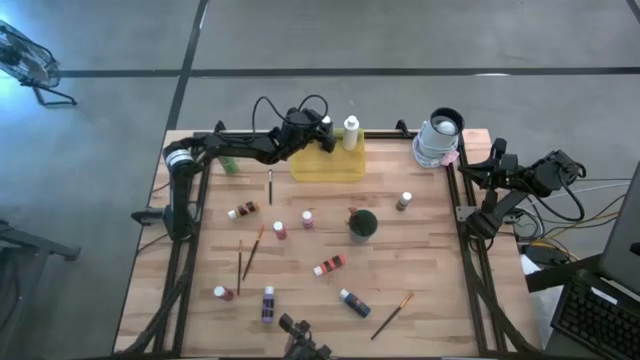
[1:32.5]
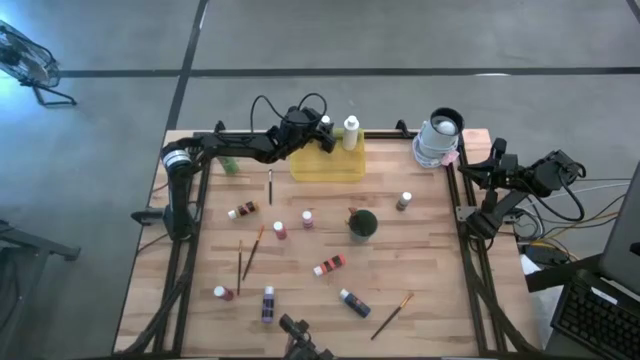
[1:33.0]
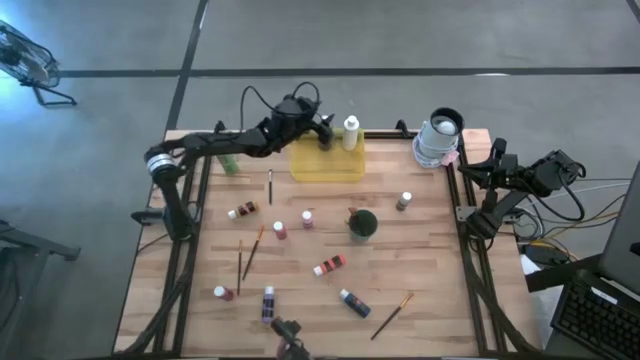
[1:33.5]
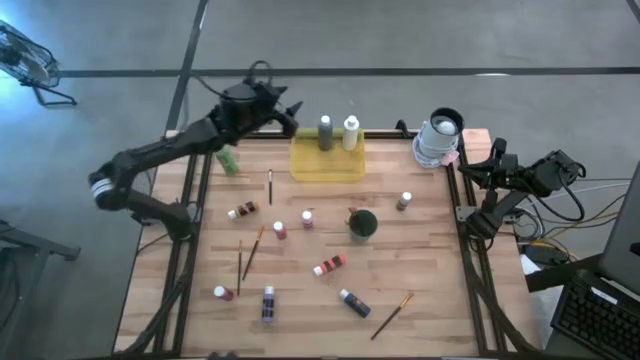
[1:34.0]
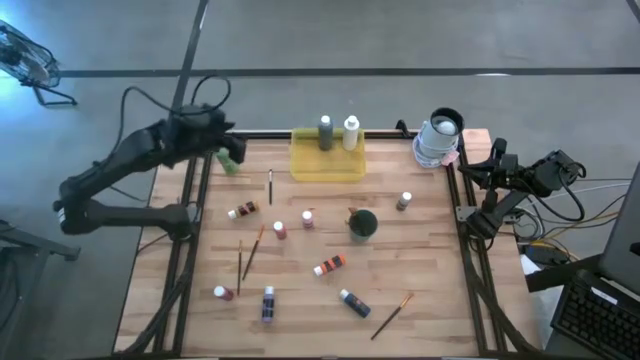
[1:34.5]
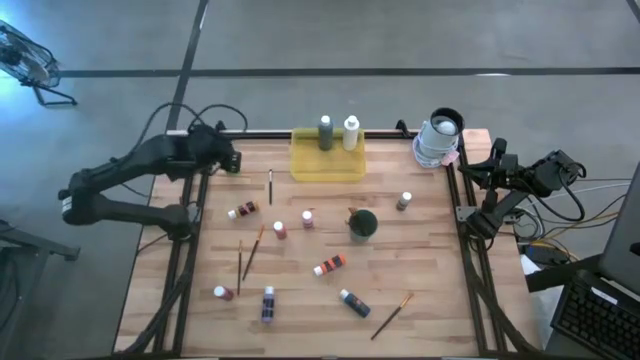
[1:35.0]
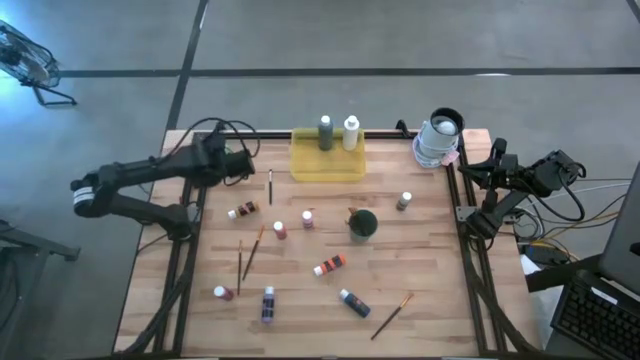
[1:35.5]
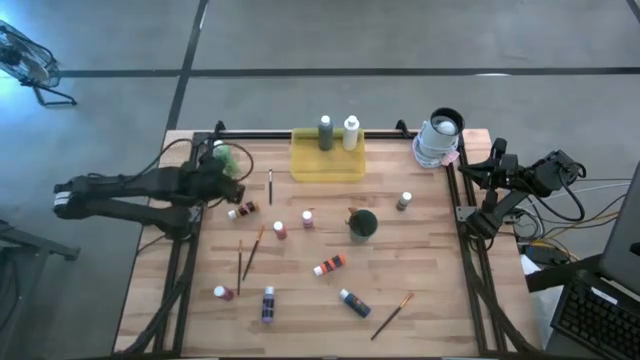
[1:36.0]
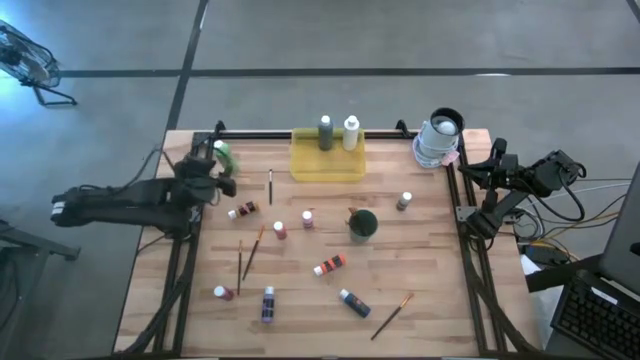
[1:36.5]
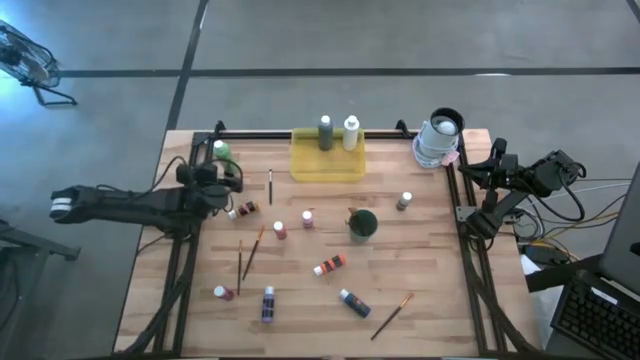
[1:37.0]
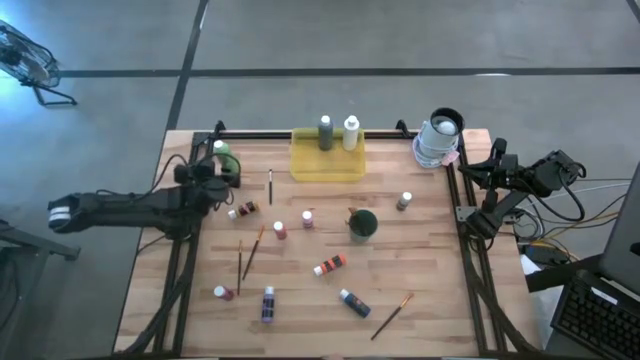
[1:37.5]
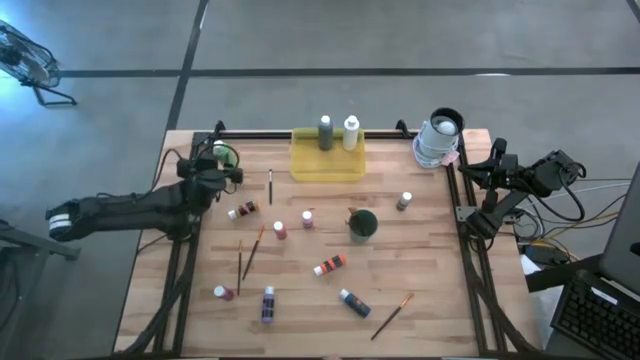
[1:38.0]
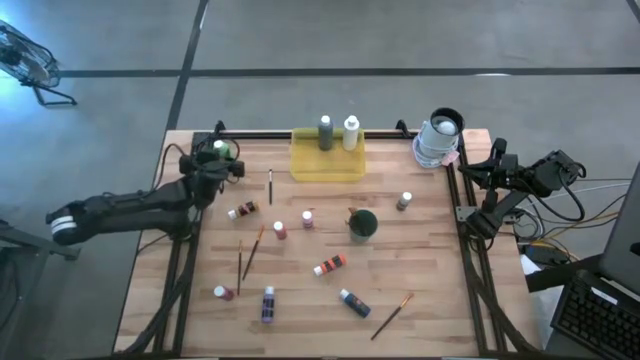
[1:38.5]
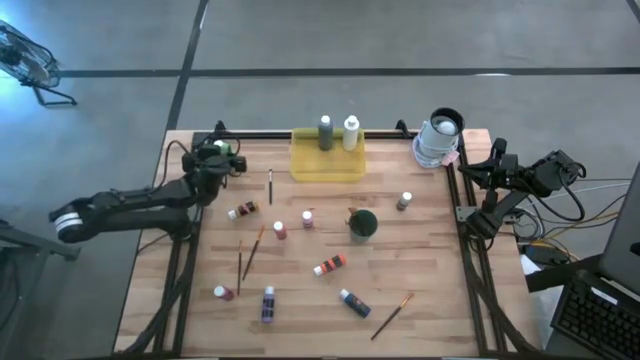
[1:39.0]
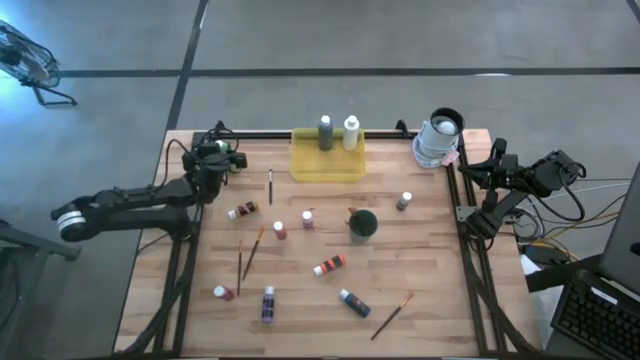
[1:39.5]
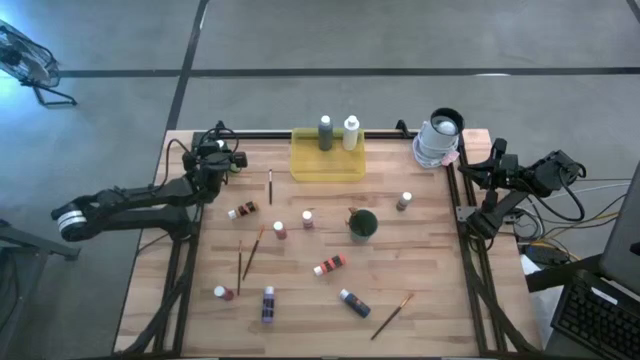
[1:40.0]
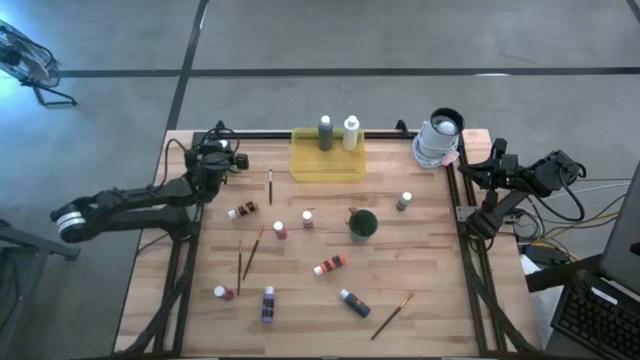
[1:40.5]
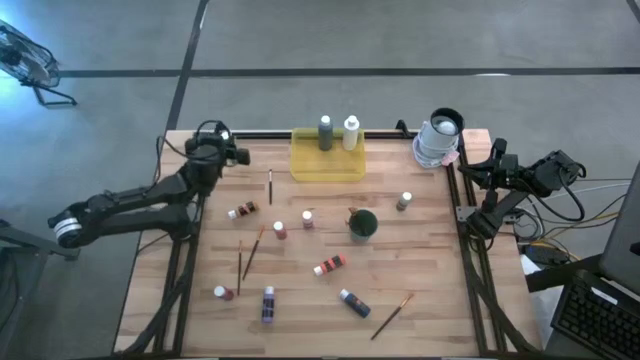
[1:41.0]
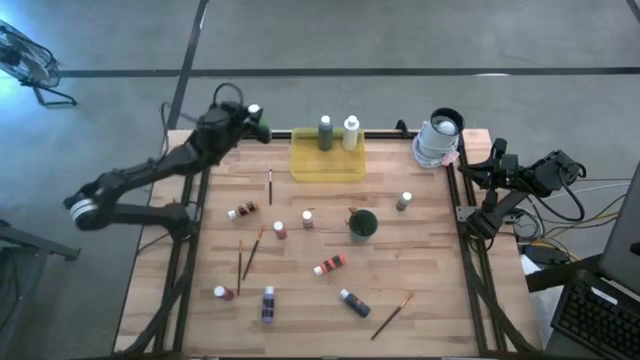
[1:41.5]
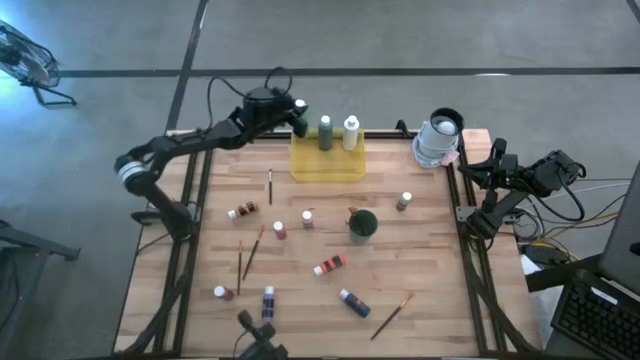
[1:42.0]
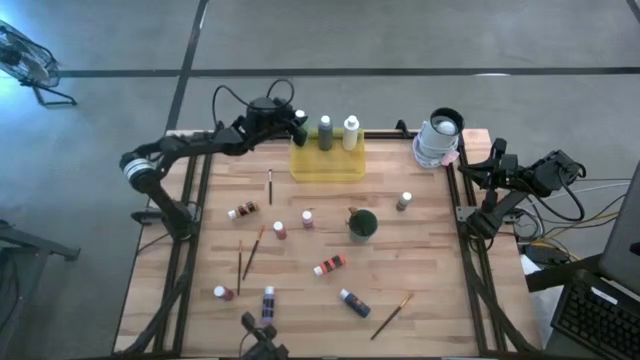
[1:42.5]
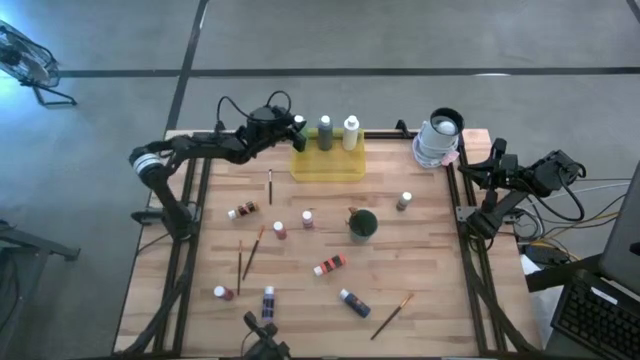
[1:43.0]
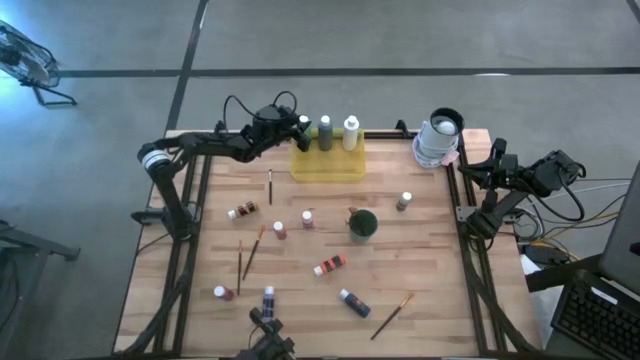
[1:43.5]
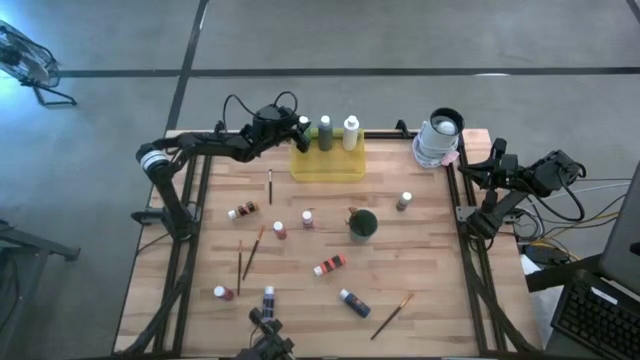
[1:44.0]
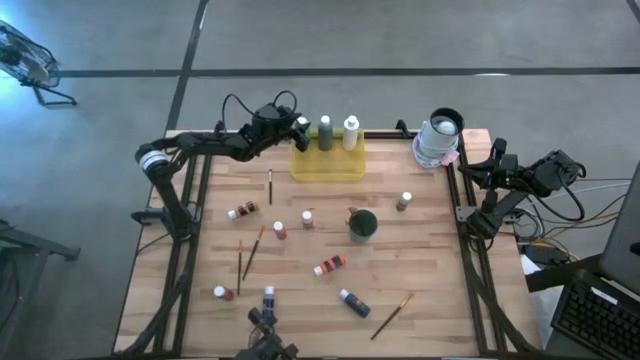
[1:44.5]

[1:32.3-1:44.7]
Task: Pick & Place Paint Supplies
Put the green paint bottle into the yellow bin

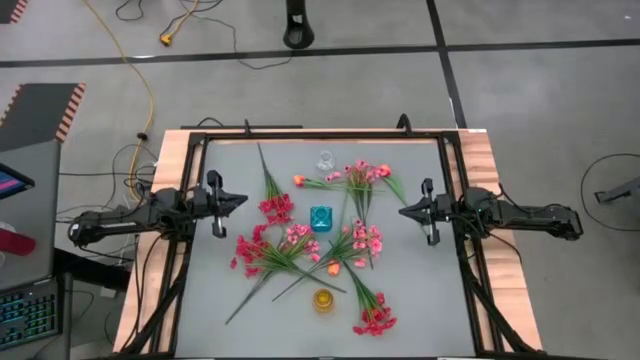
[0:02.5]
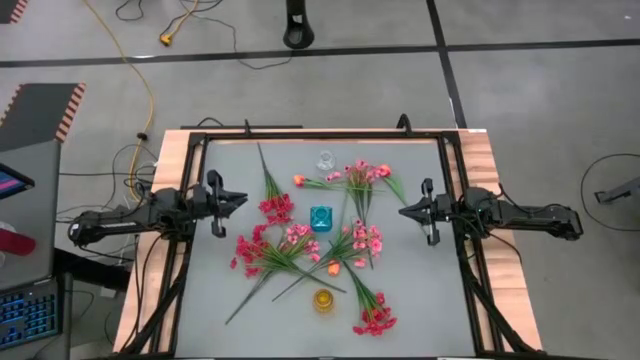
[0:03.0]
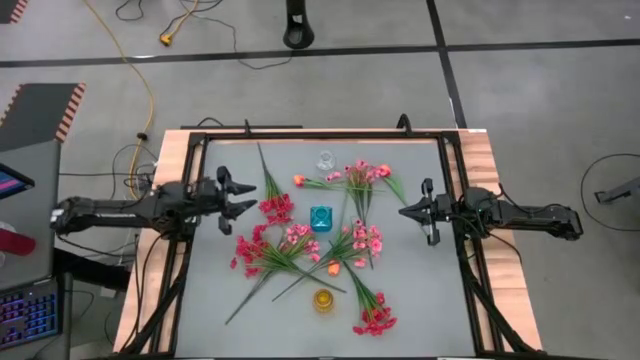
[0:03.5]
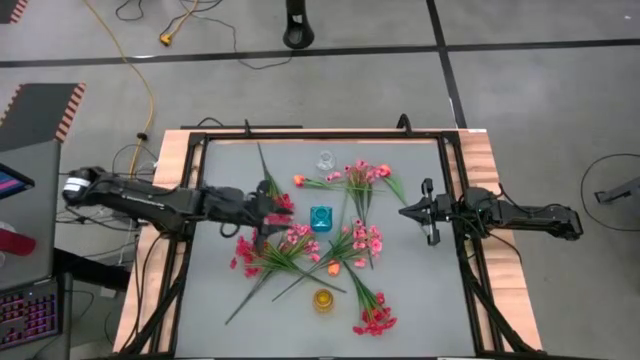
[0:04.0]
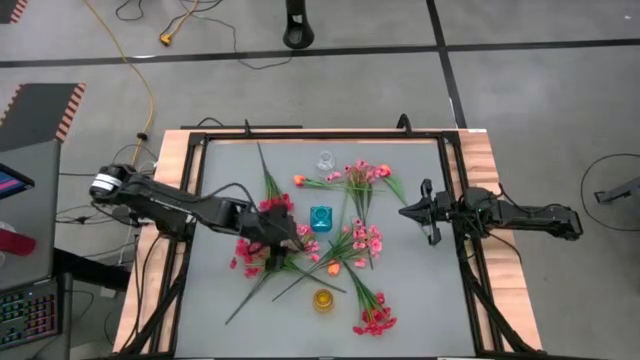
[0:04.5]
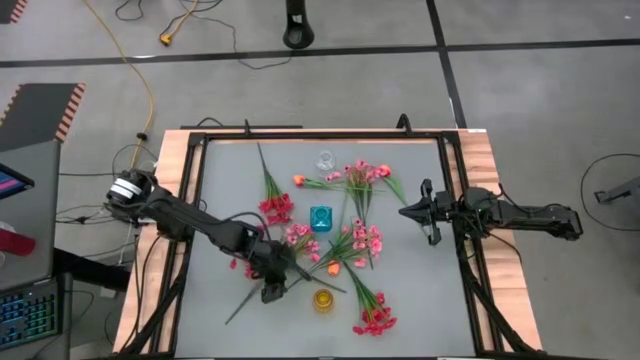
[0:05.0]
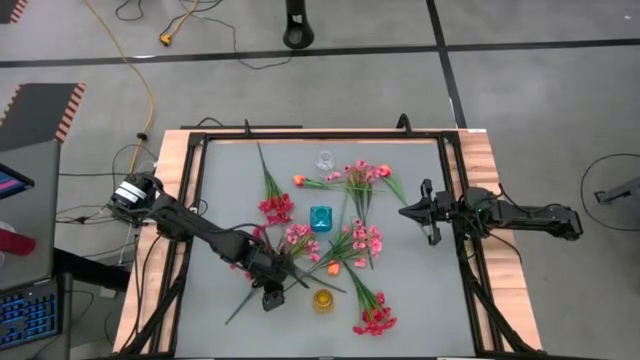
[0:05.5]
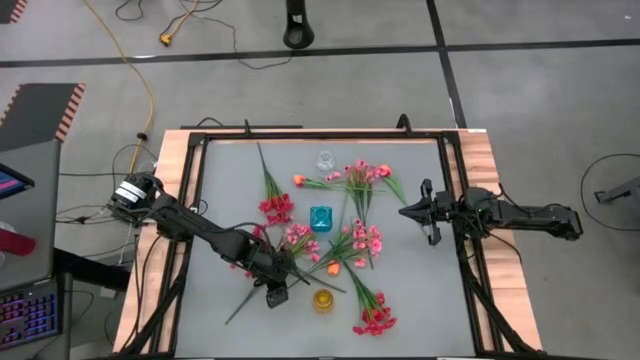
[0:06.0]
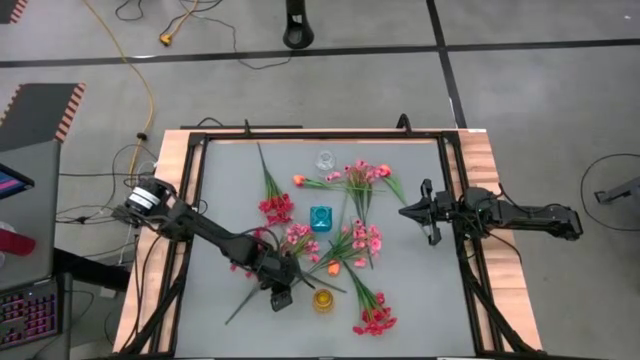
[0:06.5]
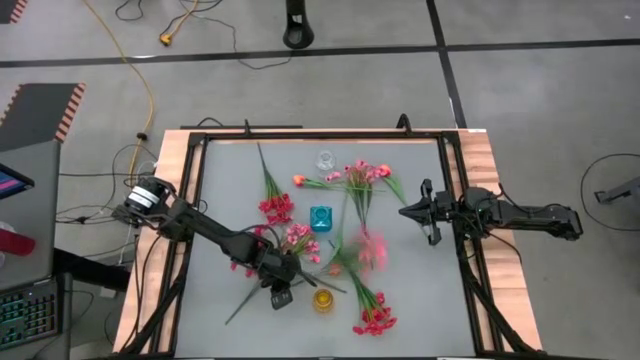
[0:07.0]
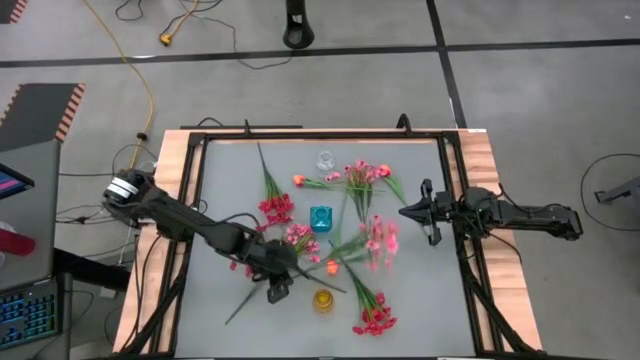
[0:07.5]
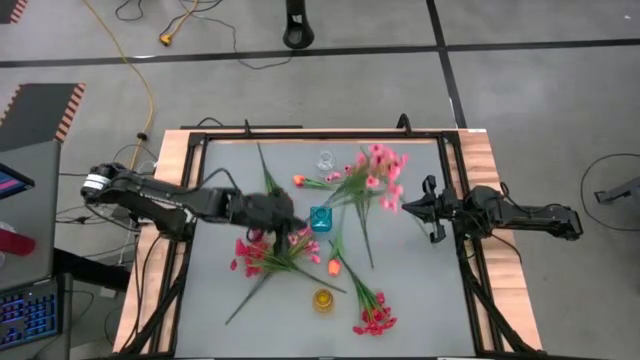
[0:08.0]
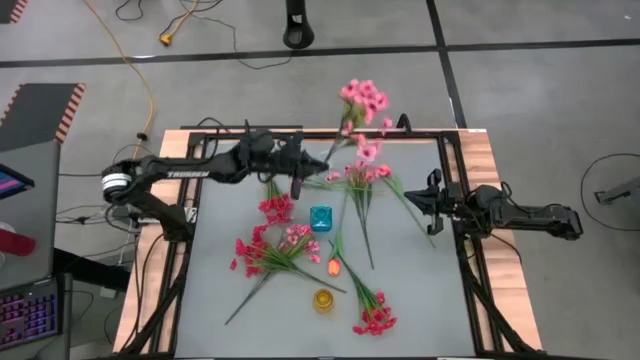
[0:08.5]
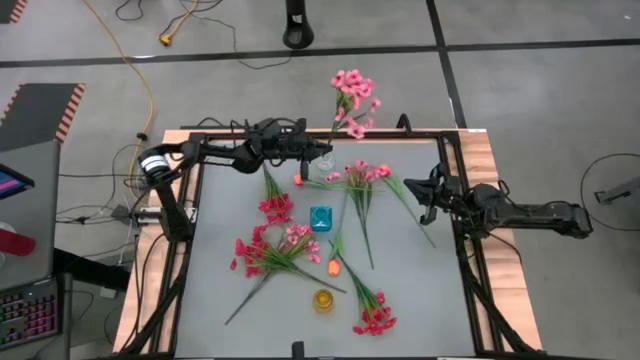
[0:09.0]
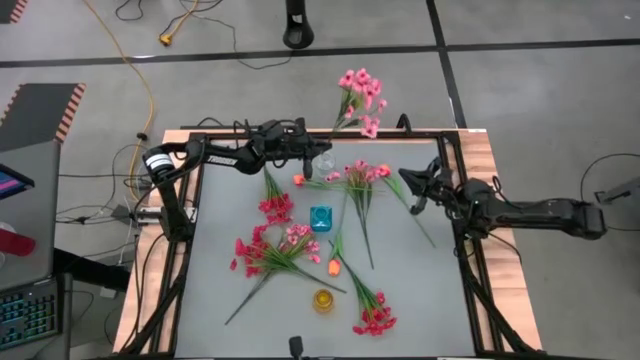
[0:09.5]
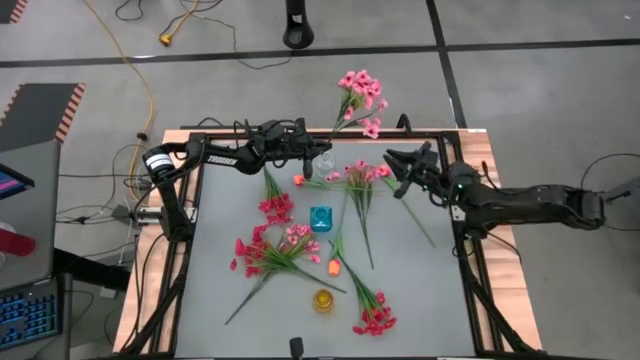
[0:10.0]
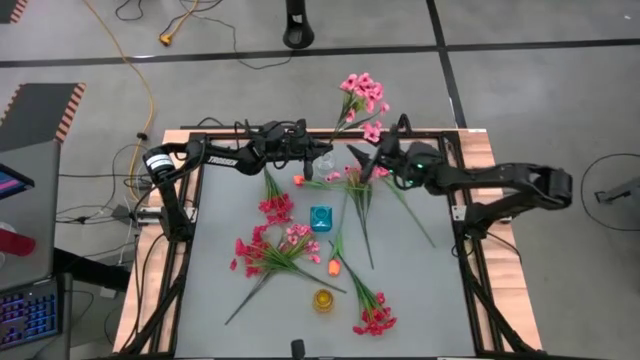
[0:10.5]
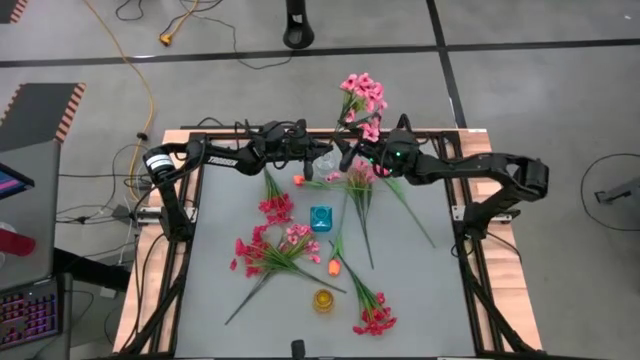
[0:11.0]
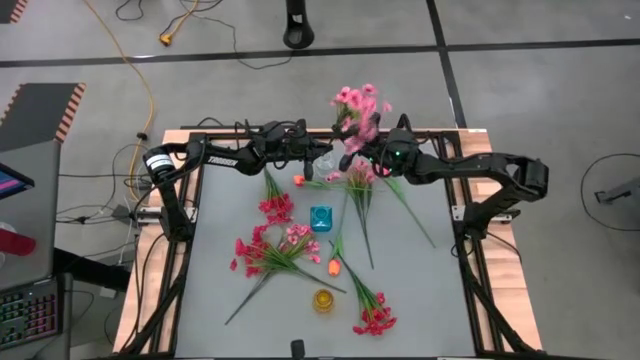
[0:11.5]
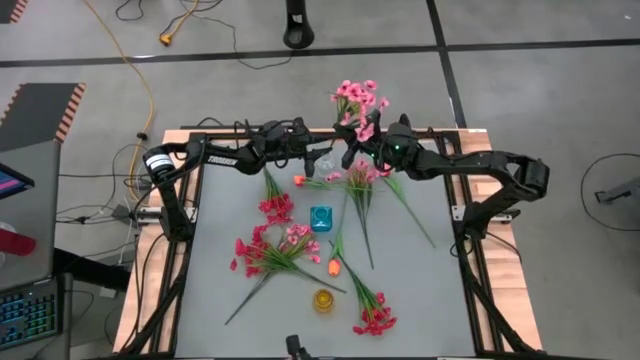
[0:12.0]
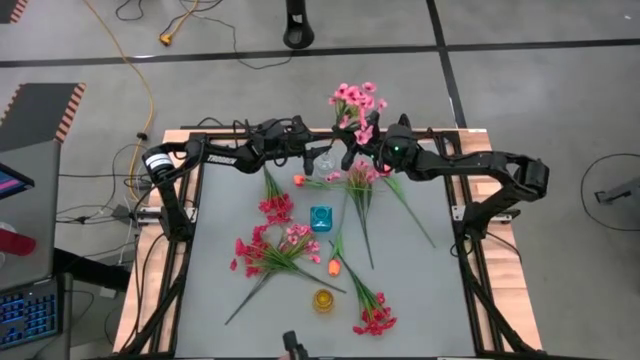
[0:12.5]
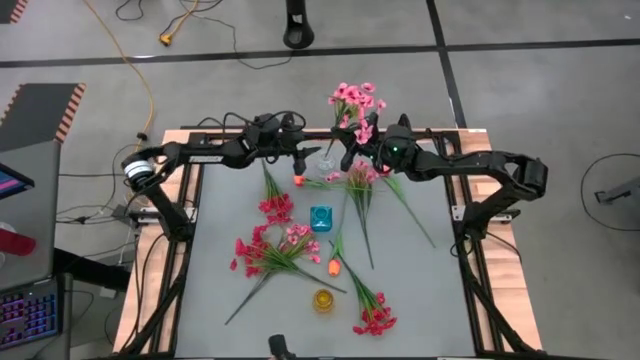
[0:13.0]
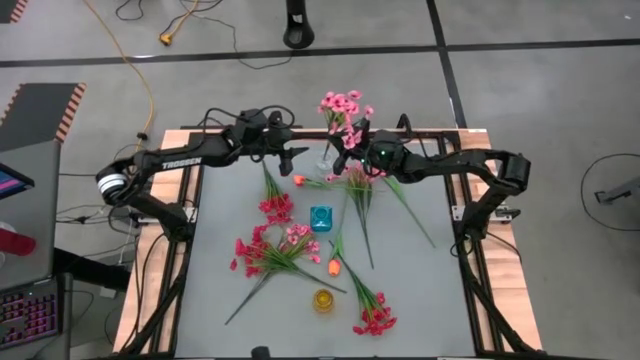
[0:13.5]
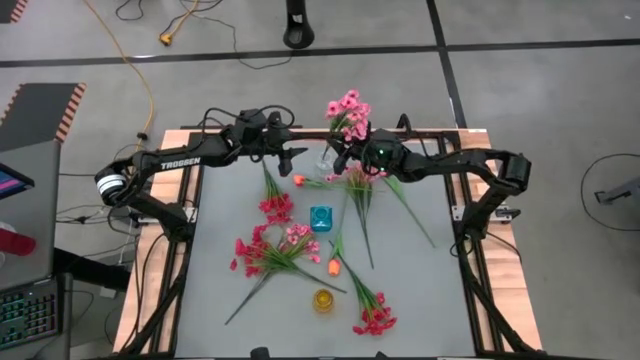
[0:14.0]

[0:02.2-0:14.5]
Task: Sort flowers into vase by color
Put the bottom right pink flowers into the transparent vase
